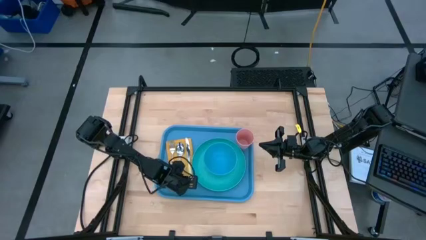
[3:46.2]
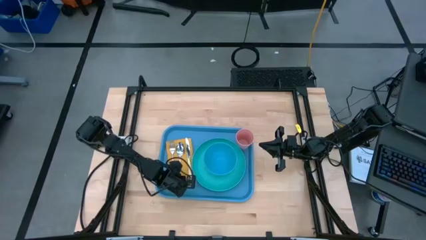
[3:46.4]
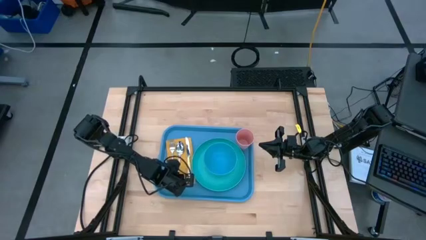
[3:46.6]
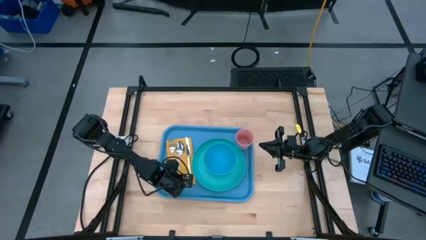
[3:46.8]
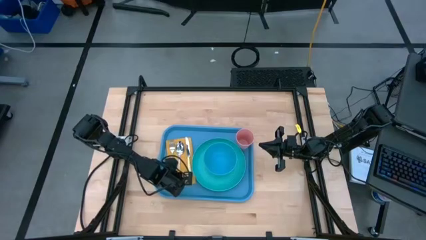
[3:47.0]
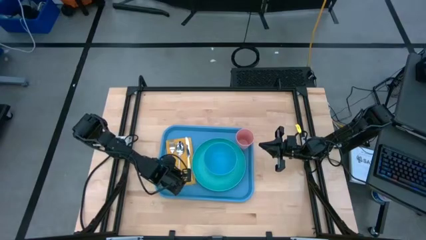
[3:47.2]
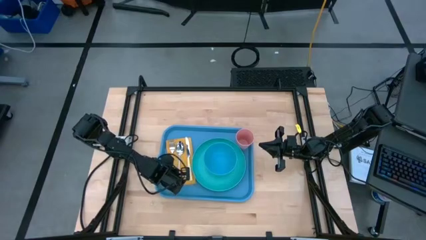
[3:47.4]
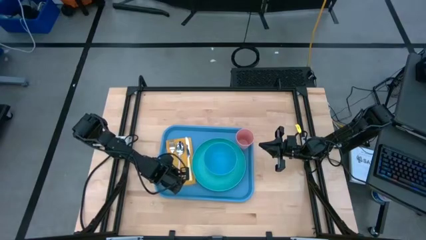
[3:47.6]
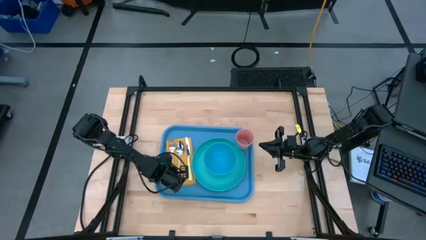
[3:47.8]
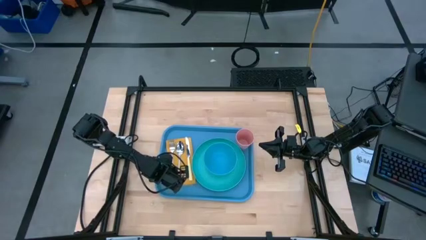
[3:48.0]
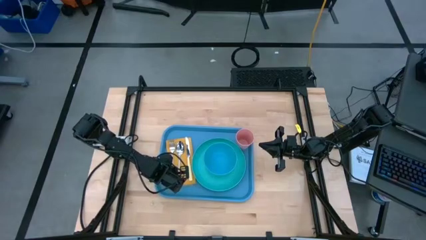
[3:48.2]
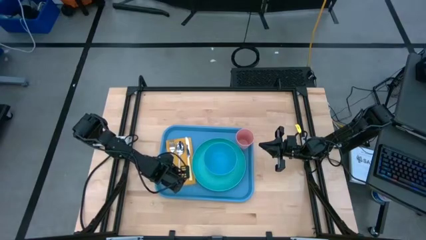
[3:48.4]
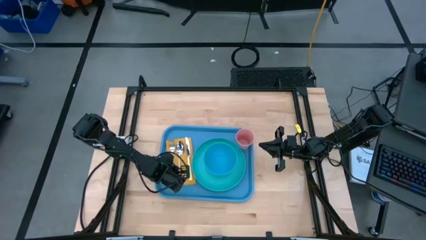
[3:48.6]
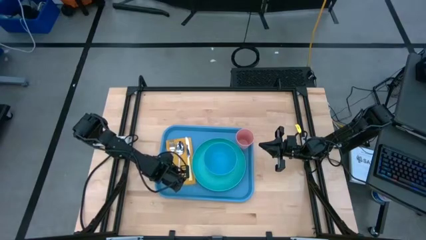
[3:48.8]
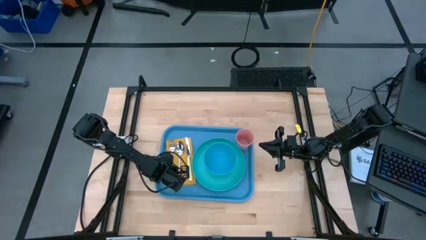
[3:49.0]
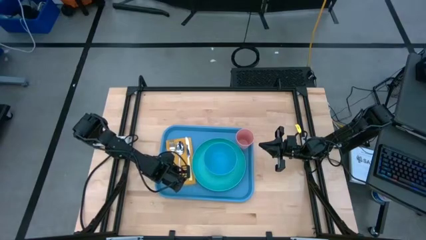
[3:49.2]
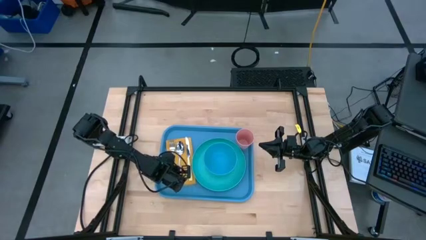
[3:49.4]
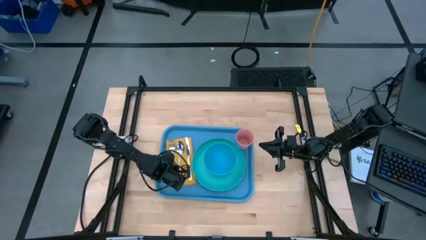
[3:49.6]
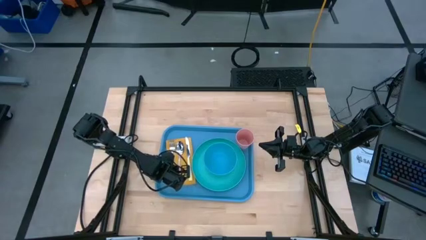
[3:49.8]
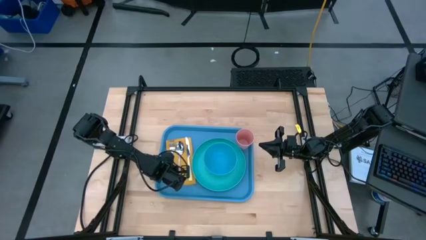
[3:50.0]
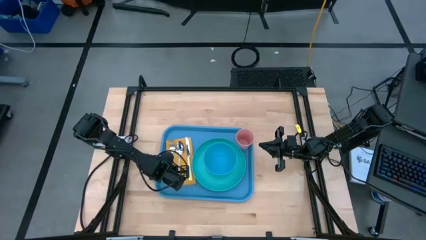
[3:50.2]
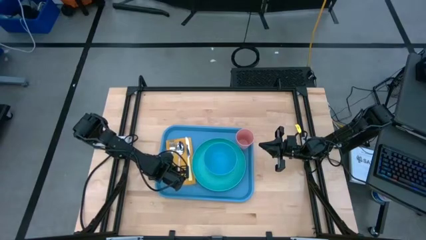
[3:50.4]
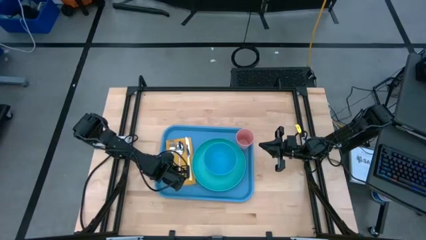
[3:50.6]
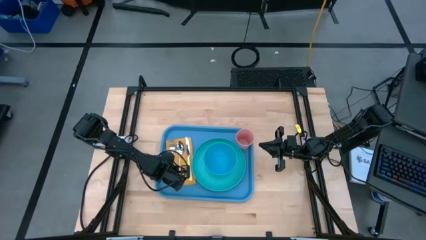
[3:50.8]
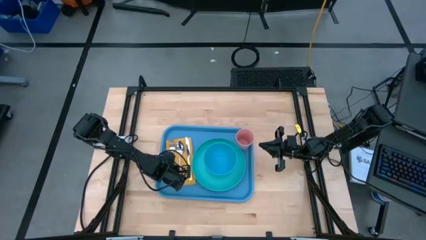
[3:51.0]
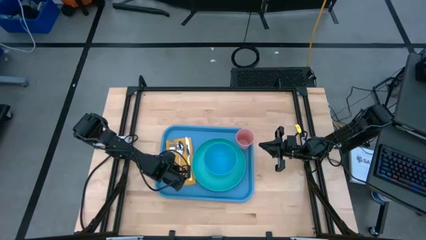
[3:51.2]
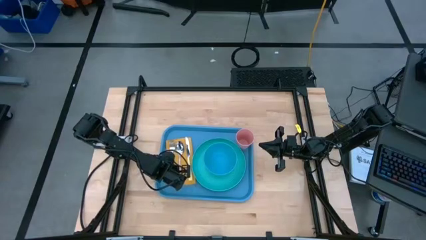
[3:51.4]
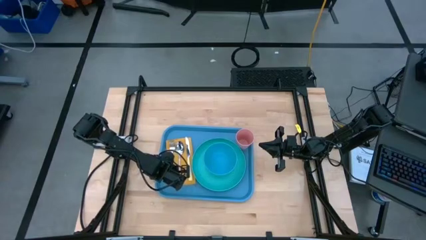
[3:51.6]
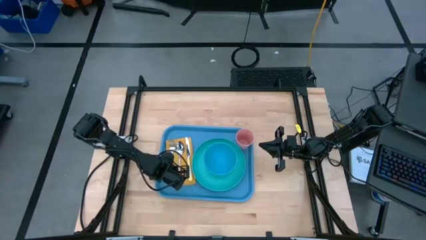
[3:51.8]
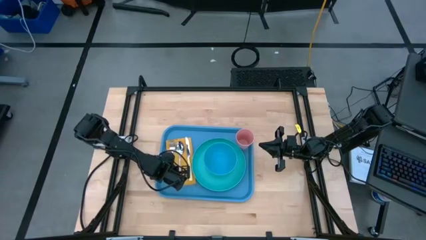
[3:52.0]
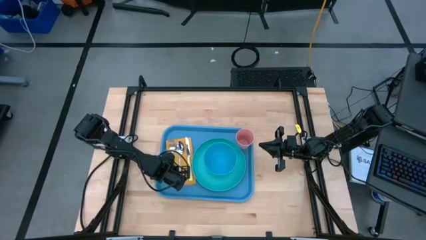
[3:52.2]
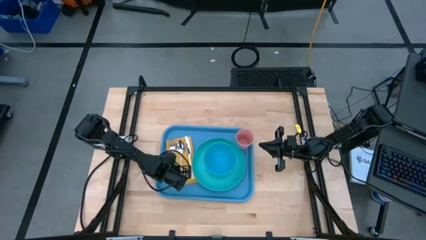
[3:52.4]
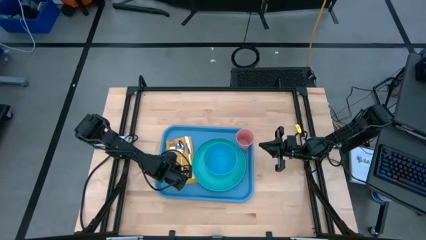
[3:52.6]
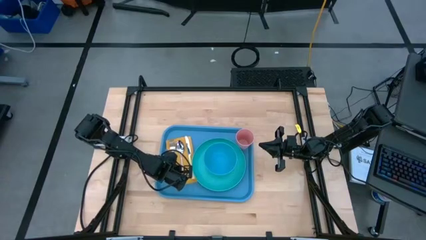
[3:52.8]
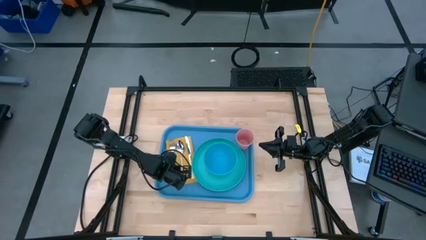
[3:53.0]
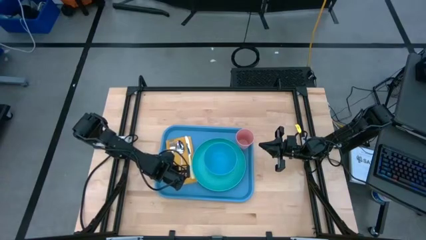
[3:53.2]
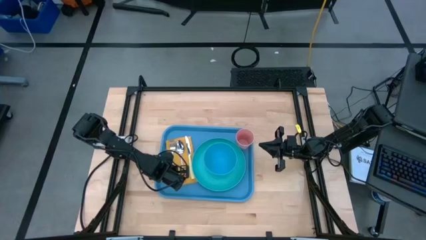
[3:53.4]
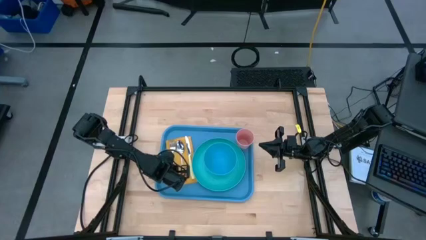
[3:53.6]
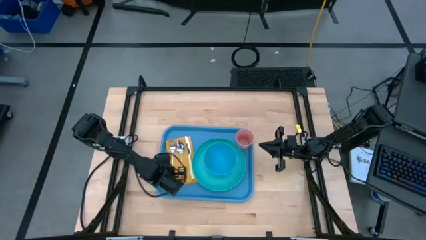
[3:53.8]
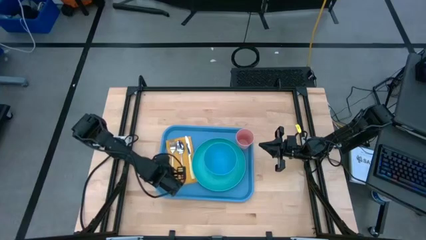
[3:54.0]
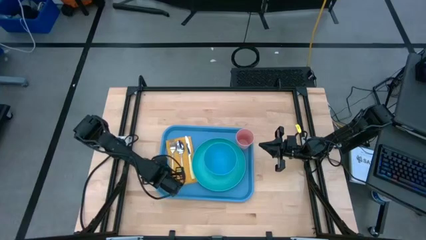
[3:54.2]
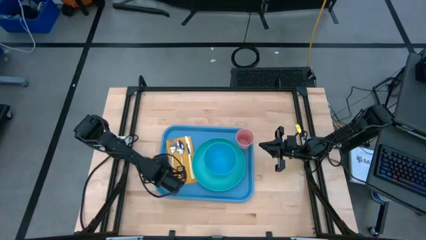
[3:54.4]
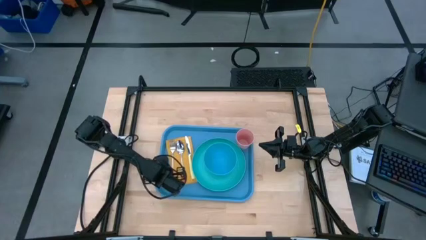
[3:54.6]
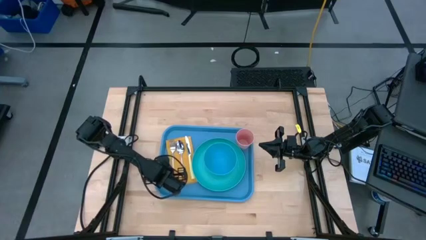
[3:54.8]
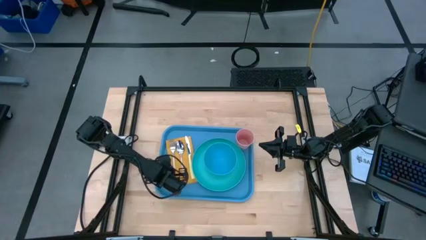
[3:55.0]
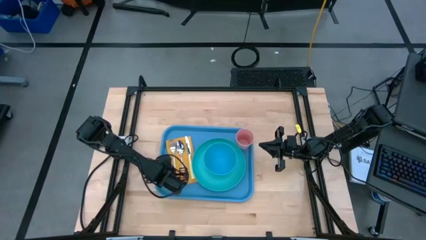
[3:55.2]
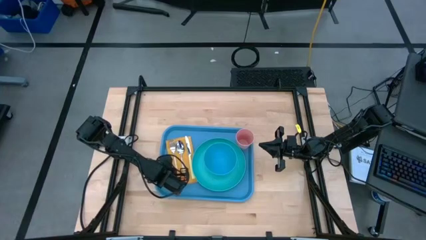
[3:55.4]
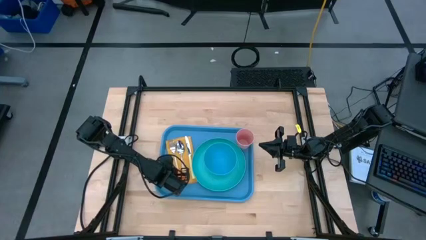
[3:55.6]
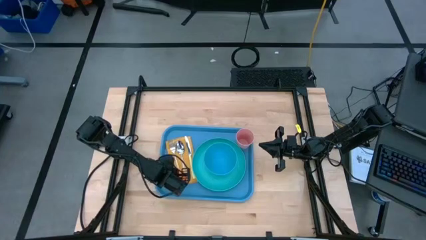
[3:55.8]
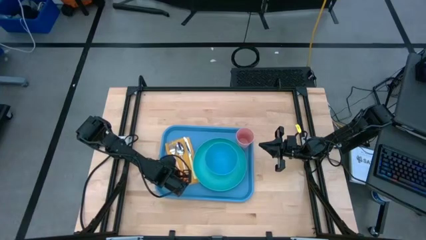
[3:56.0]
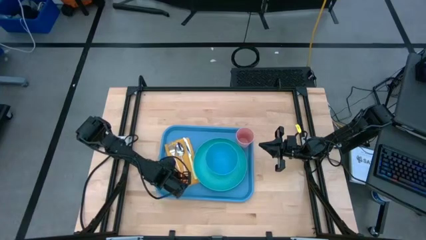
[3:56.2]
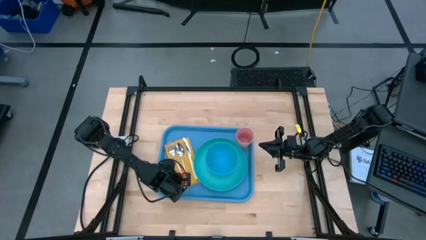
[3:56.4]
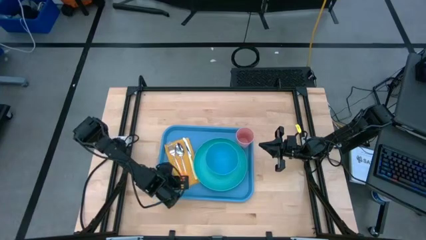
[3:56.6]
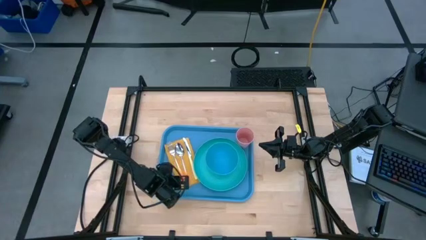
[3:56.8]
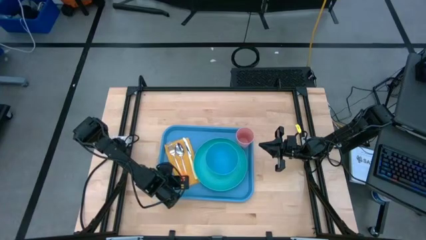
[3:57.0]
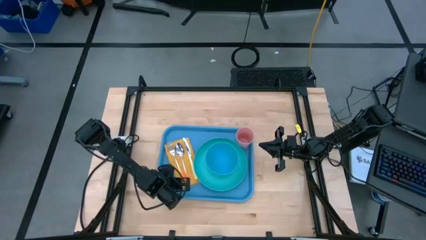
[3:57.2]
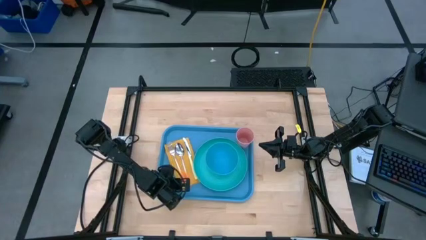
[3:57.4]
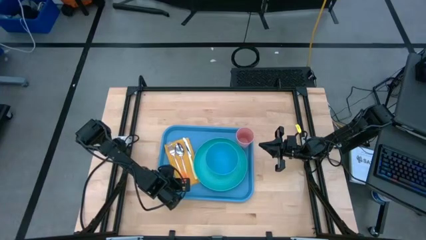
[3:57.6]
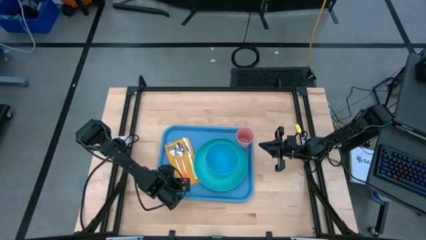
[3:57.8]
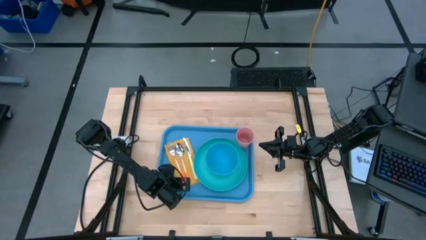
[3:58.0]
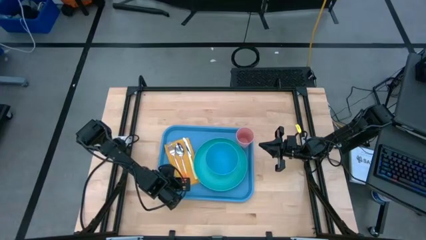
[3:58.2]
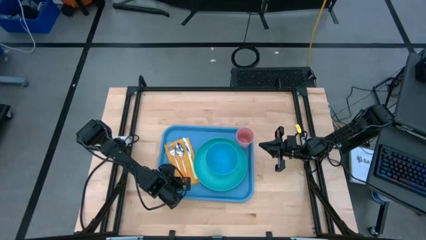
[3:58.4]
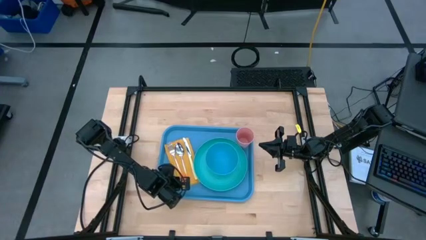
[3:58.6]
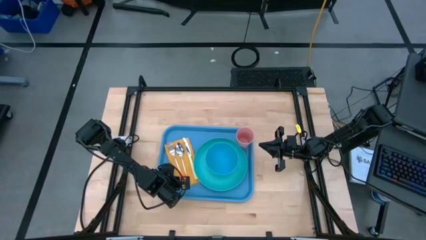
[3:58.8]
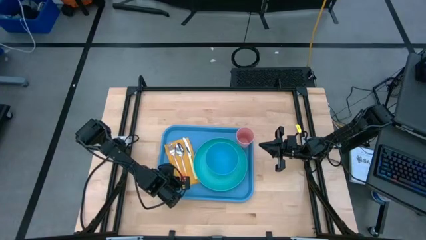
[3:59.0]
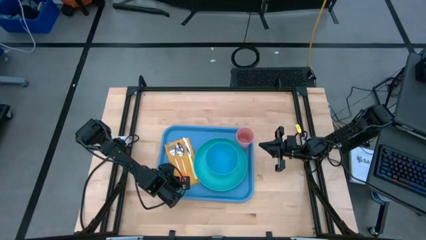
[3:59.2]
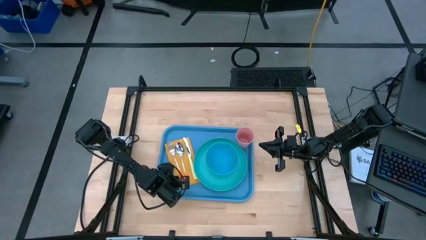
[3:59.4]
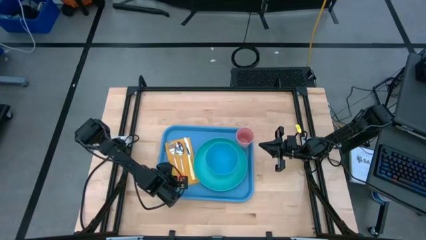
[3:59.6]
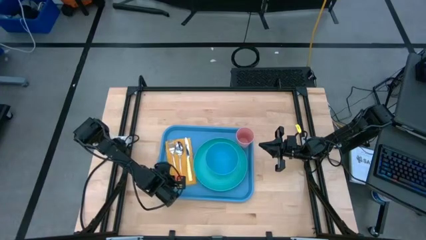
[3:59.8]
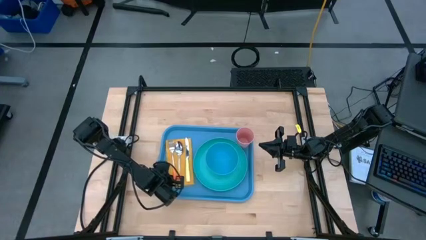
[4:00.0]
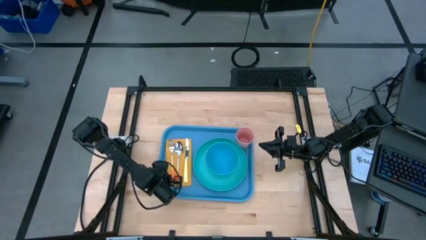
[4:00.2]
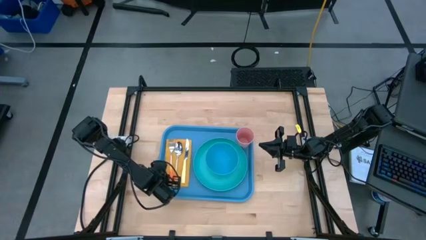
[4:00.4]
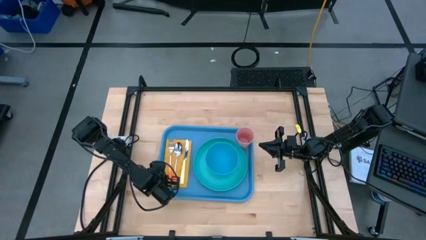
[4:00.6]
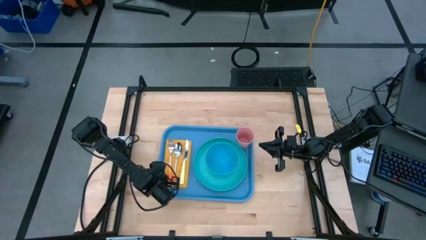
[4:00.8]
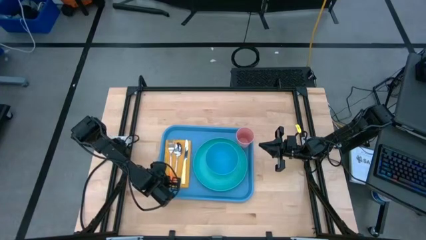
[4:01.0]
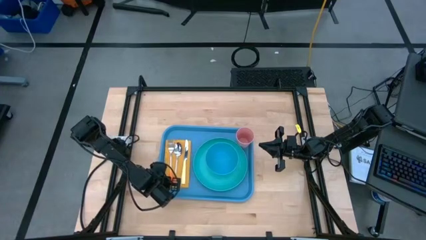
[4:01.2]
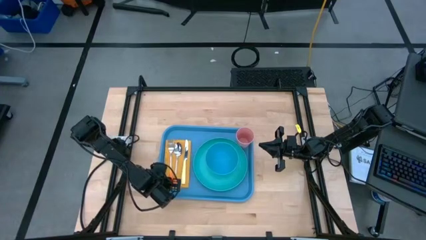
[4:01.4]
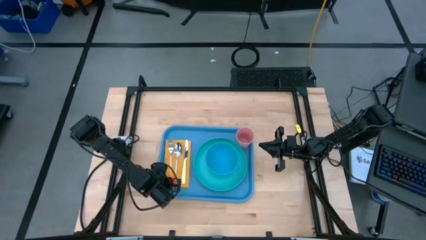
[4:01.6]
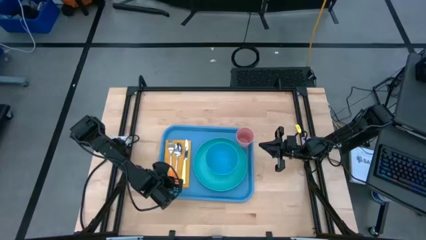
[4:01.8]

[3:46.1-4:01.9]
Task: Set up tray
Adjust the yellow napkin on the blue serving tray
